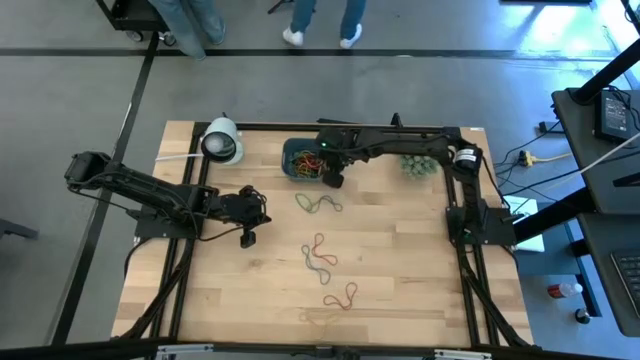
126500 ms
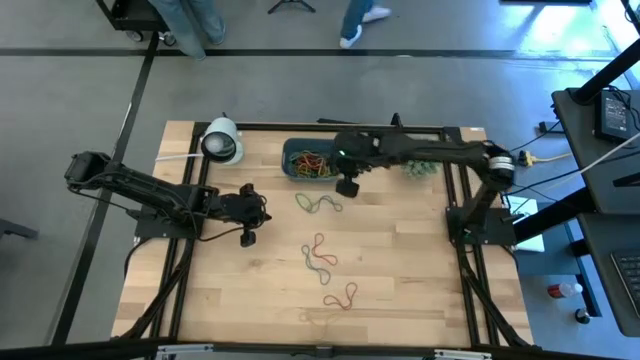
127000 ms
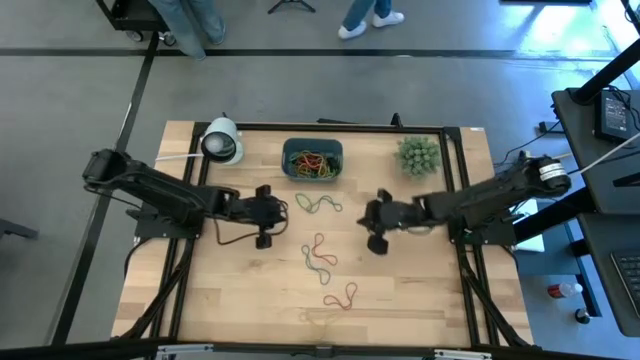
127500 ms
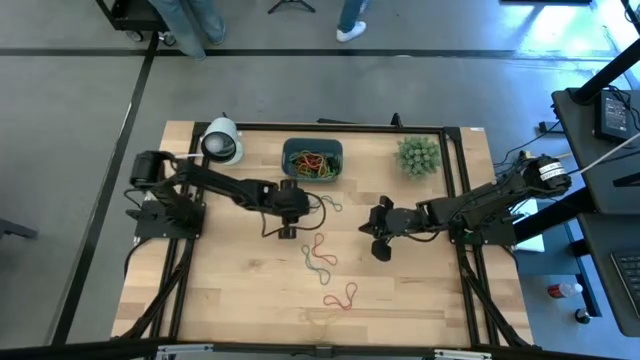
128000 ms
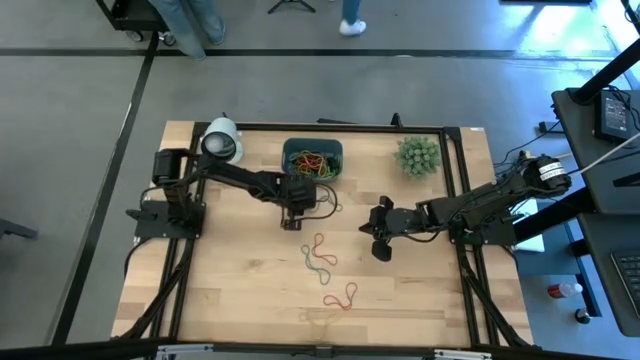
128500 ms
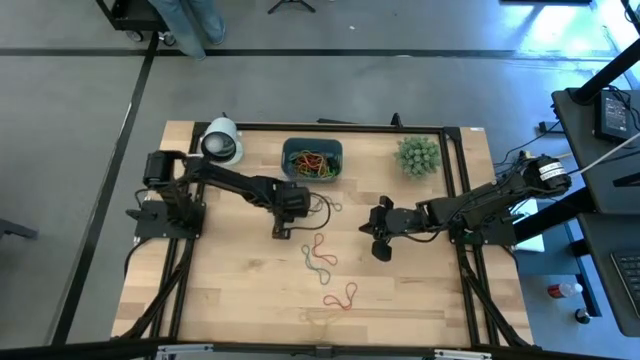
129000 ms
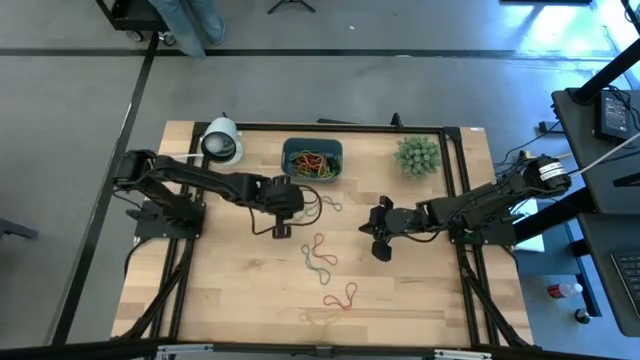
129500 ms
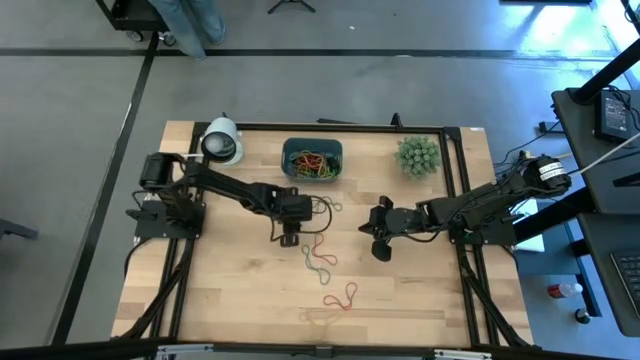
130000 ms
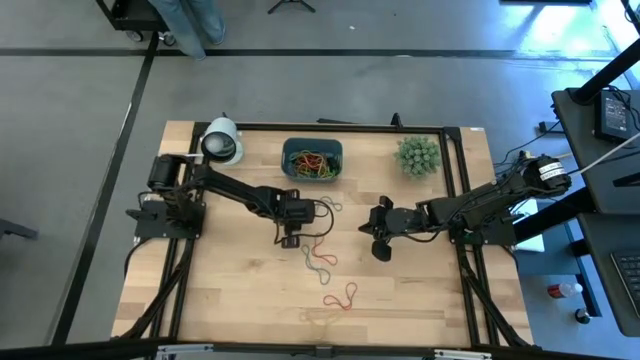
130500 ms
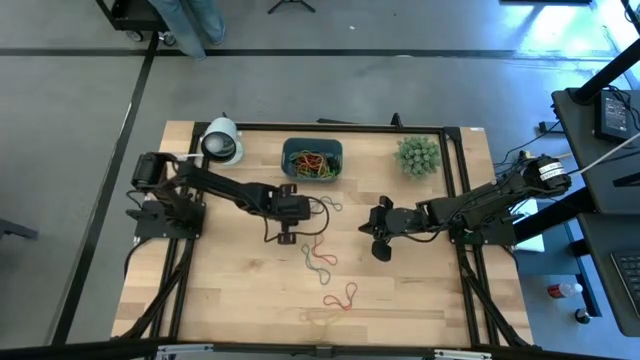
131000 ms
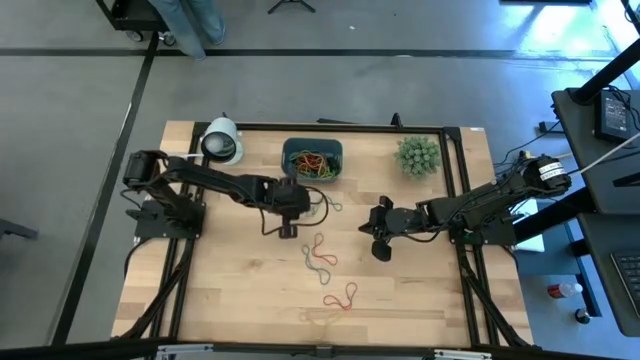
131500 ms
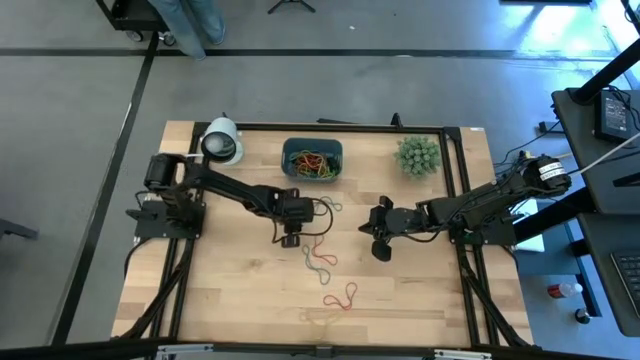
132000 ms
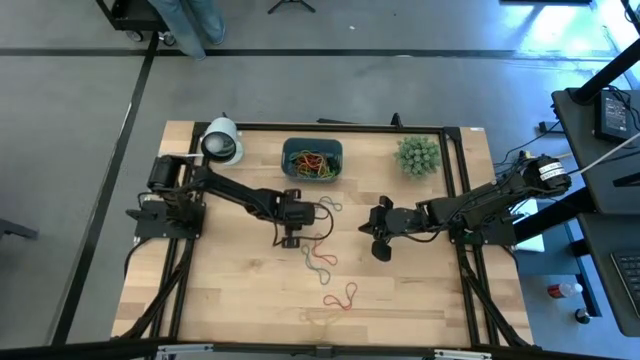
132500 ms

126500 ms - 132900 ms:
Task: Pick and place rubber bands into bin
Put the green rubber band into the blue bin

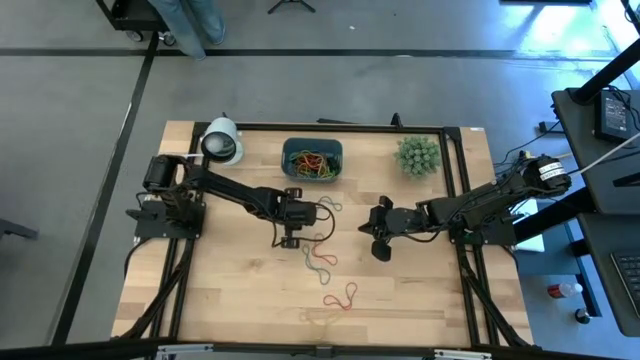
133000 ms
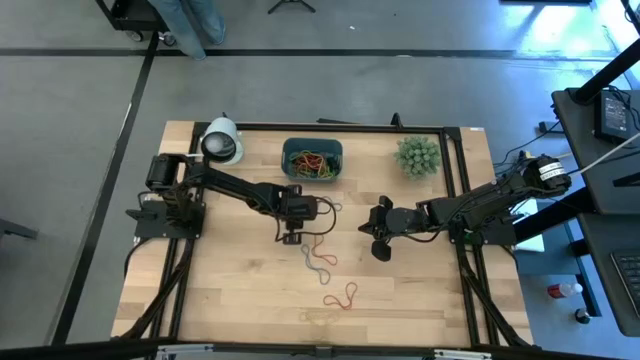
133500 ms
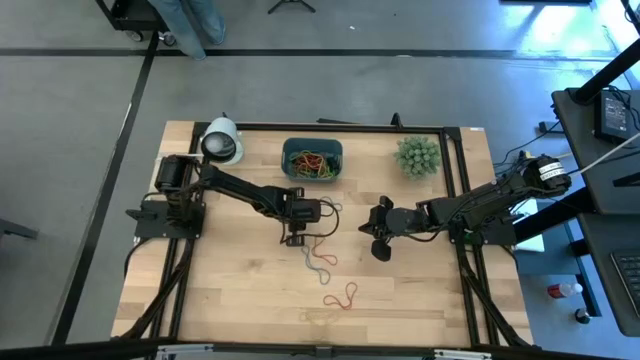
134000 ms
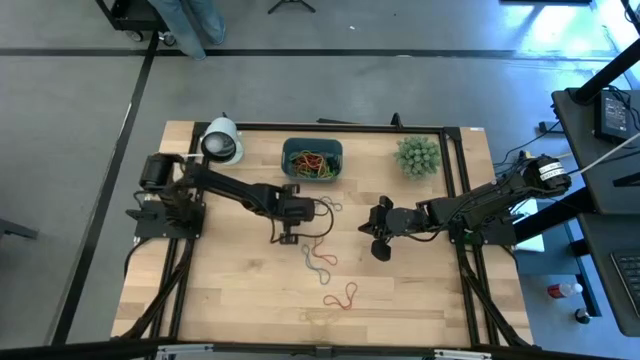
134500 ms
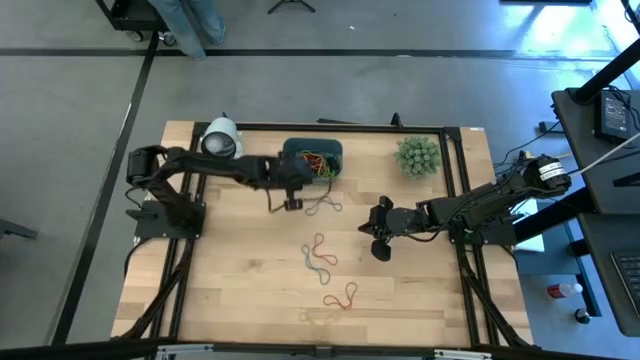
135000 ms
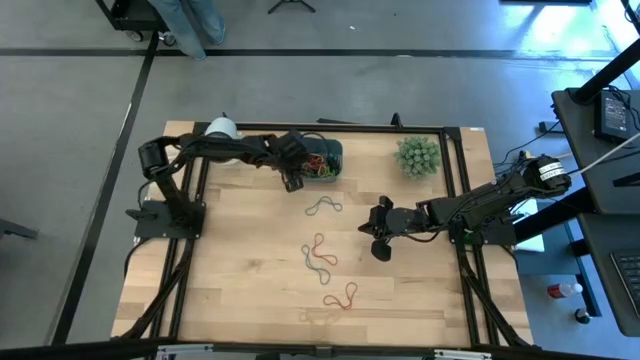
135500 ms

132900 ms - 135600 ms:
Put the green rubber band into the blue bin

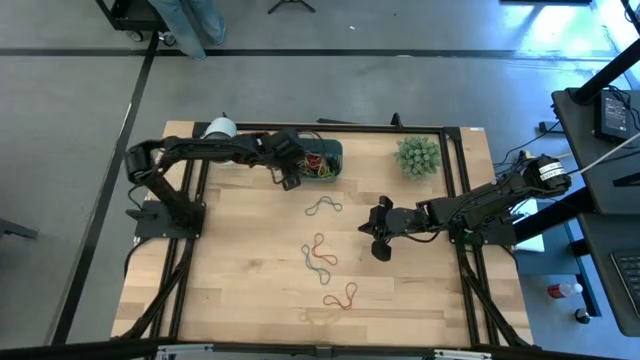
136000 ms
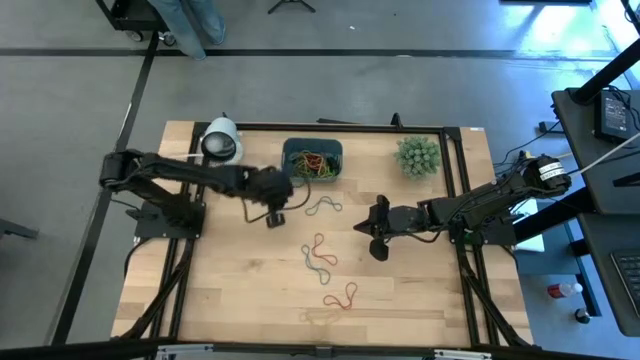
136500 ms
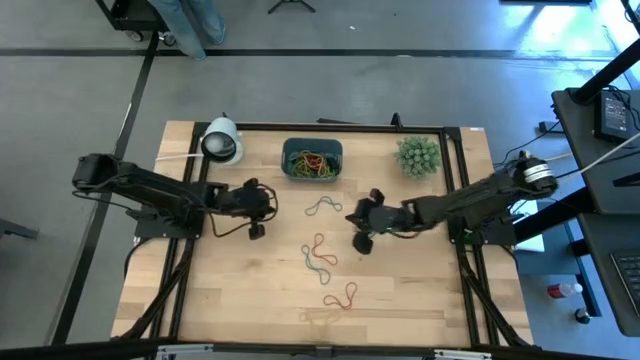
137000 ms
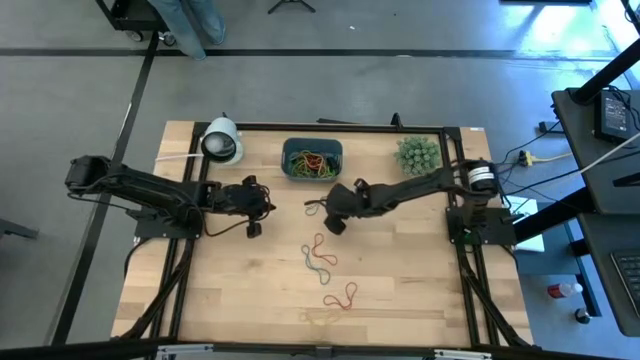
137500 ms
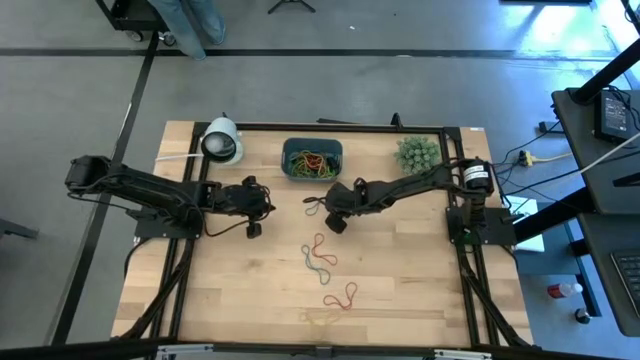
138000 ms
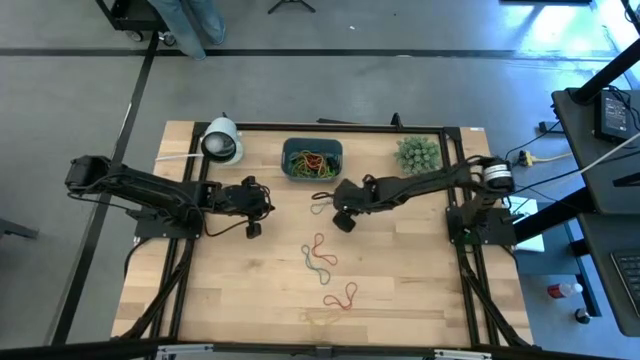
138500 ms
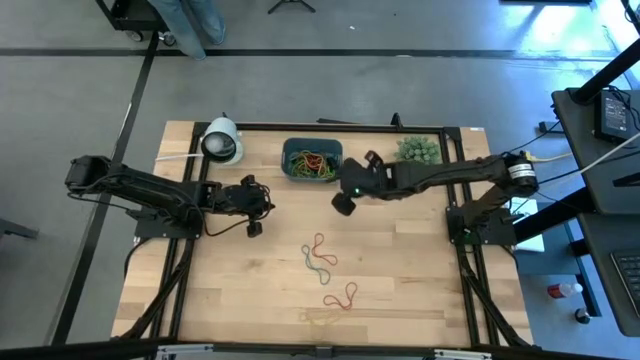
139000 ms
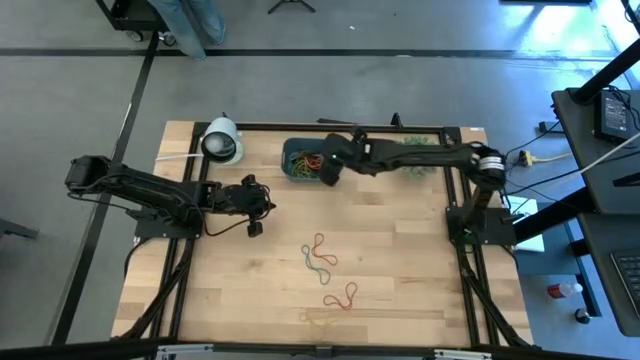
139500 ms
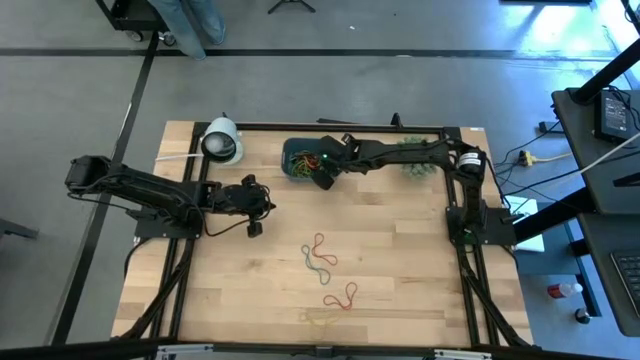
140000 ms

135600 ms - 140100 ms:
Put the blue rubber band into the blue bin

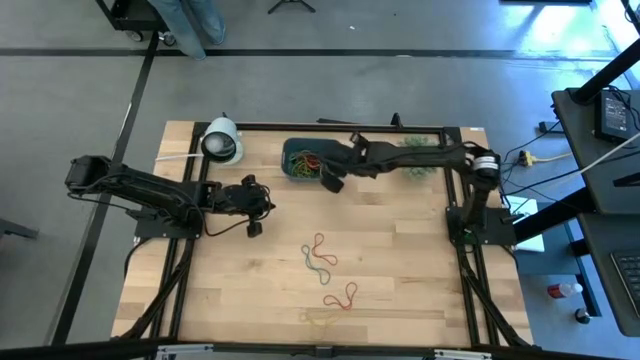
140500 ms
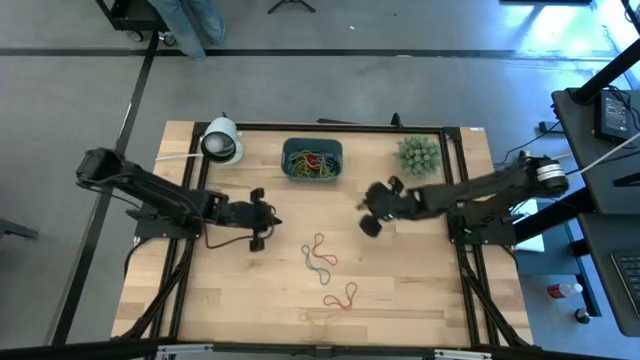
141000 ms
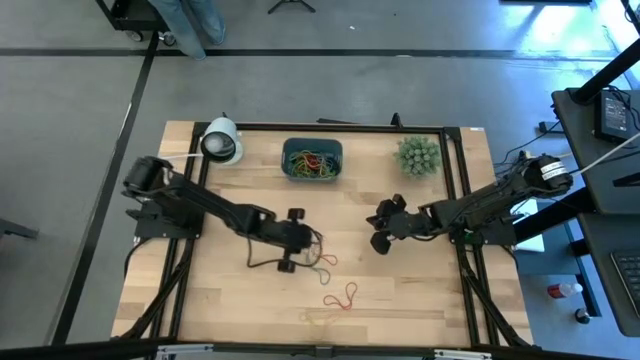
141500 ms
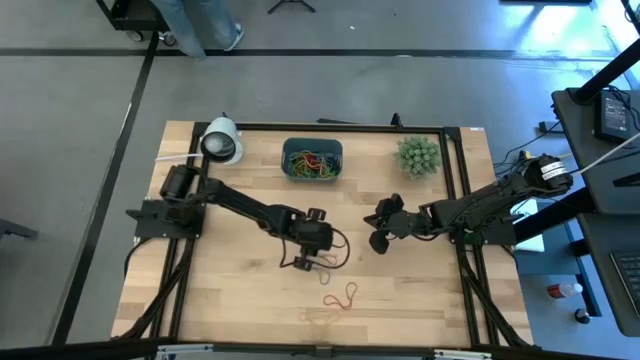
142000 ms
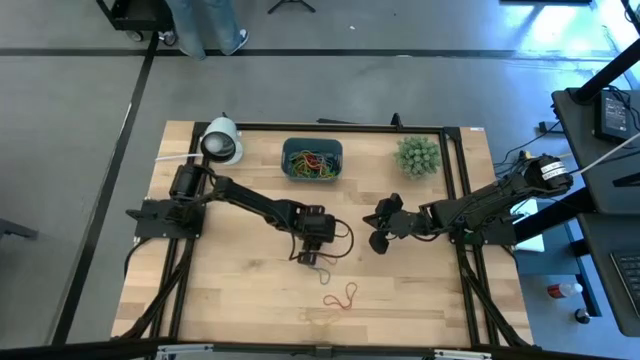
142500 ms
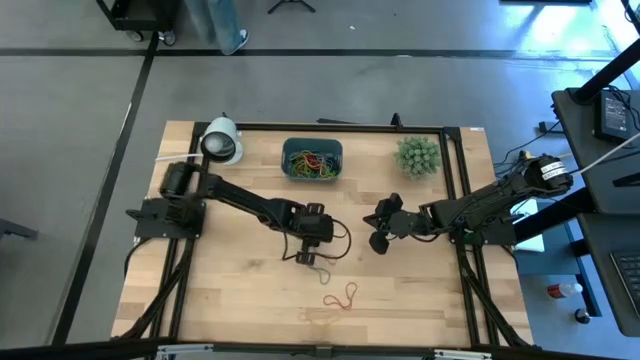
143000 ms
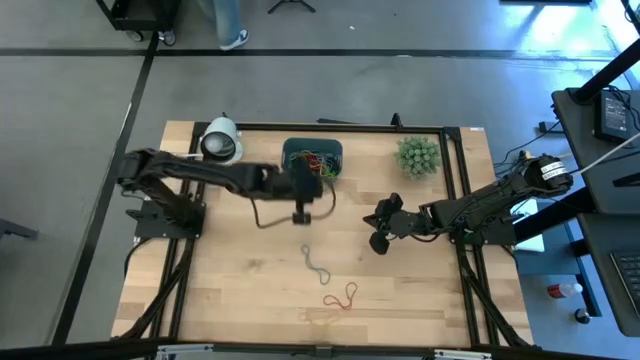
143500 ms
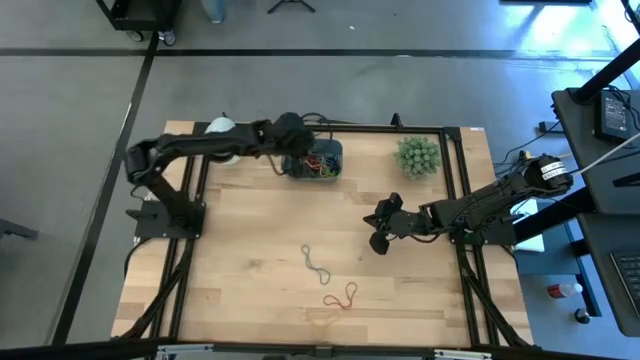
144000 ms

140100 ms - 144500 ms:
Put the red rubber band into the blue bin

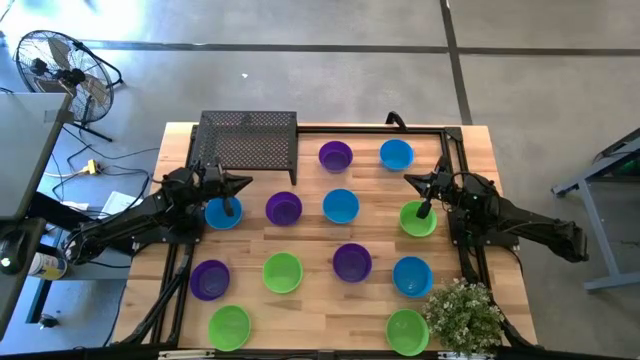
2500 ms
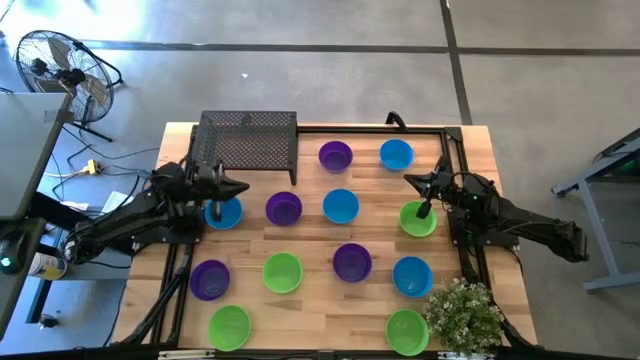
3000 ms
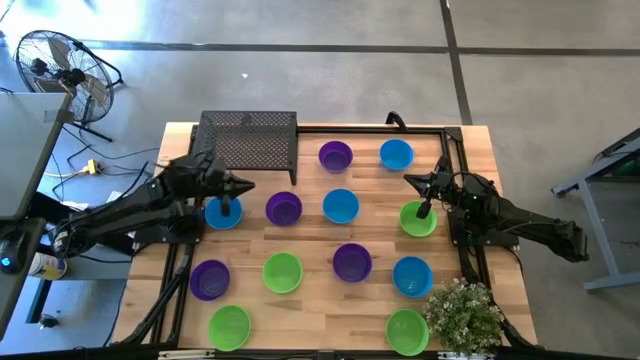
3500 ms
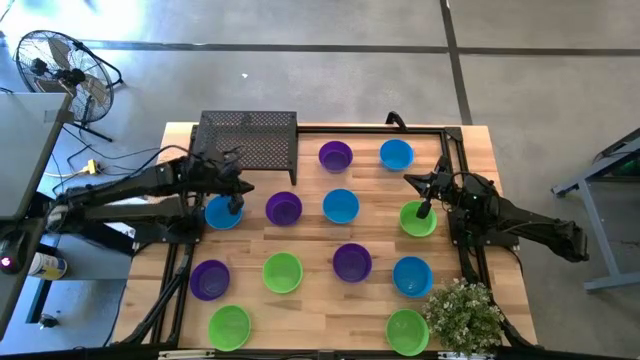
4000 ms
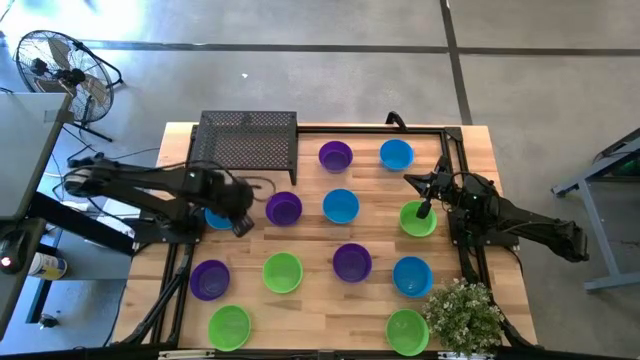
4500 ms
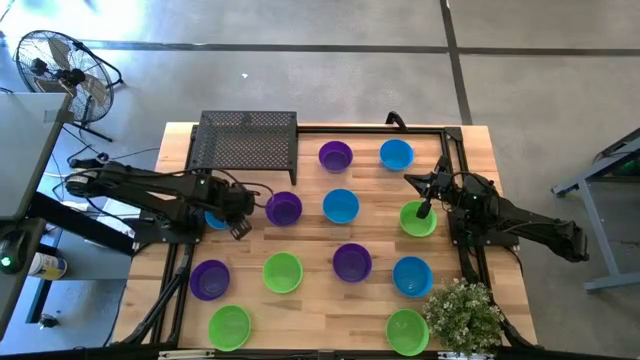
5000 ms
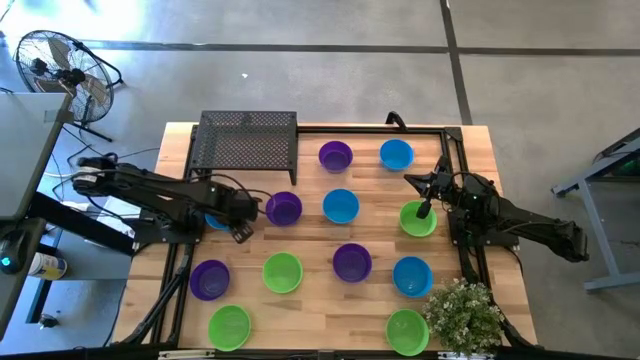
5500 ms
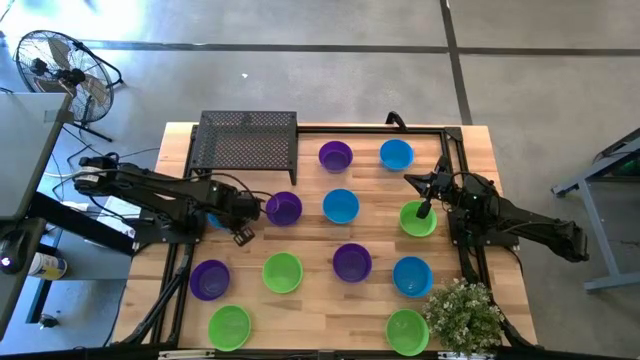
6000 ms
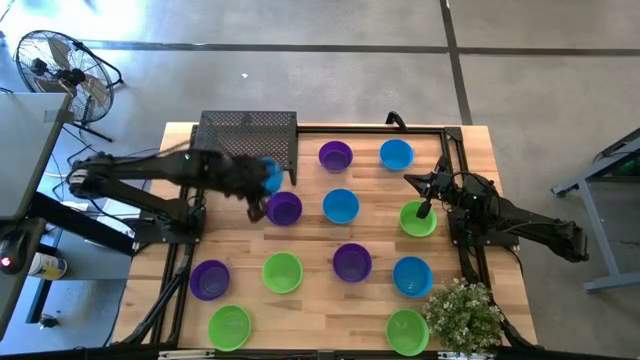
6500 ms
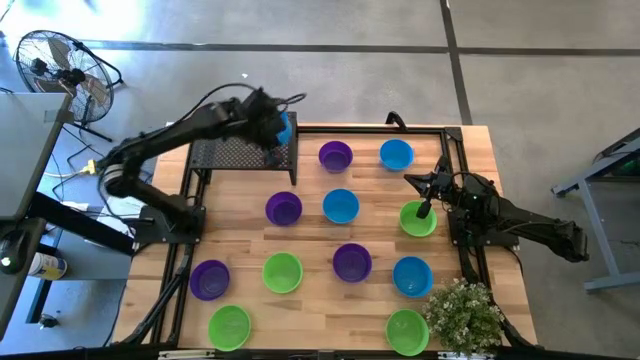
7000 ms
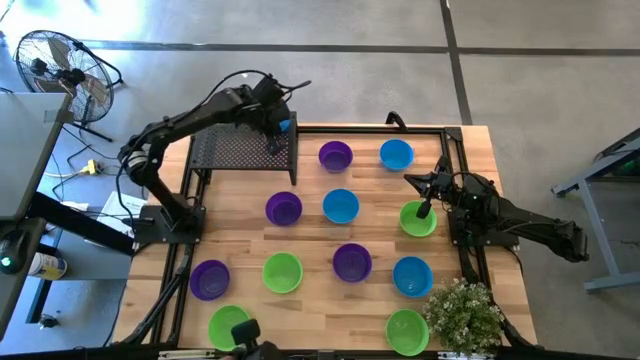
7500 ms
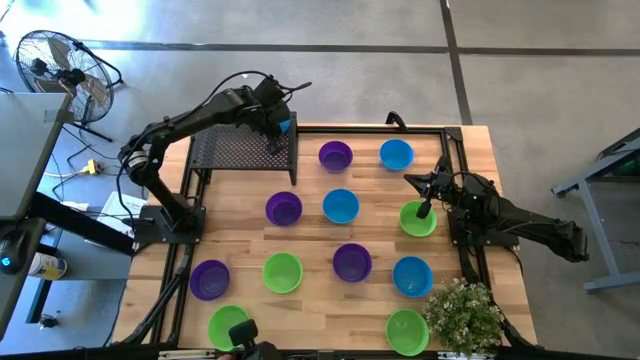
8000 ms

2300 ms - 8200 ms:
Task: Pick & Place Mini bowls
Put the blue bowl on the shelf
